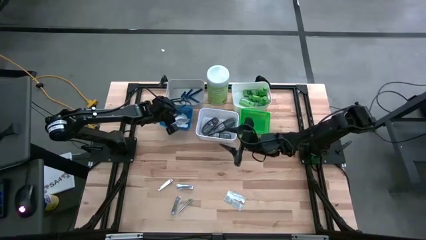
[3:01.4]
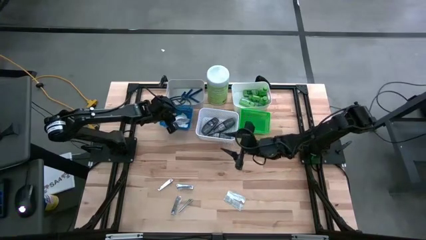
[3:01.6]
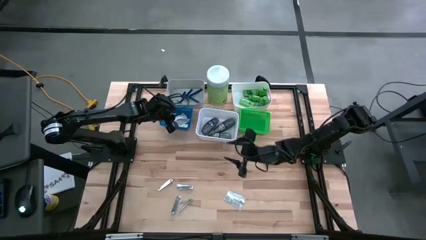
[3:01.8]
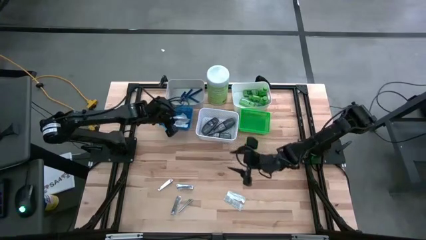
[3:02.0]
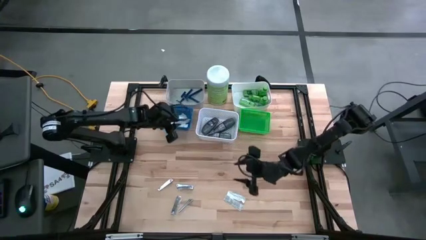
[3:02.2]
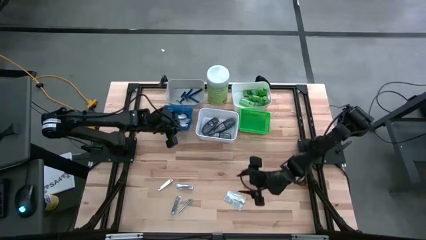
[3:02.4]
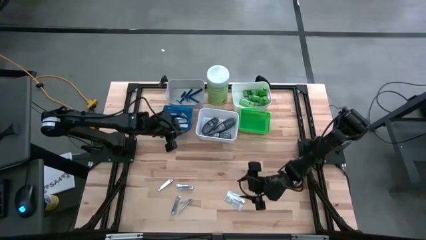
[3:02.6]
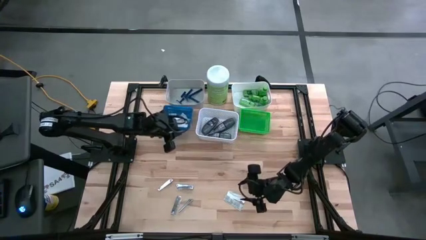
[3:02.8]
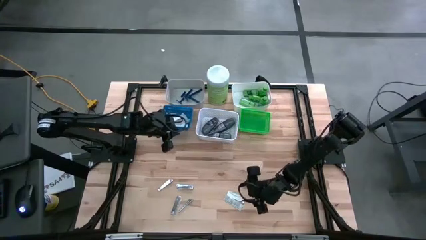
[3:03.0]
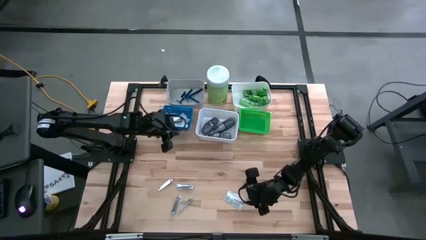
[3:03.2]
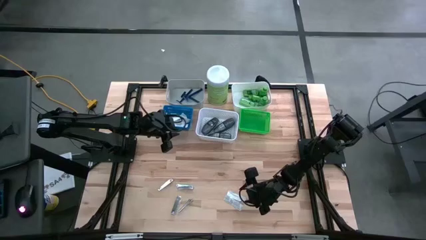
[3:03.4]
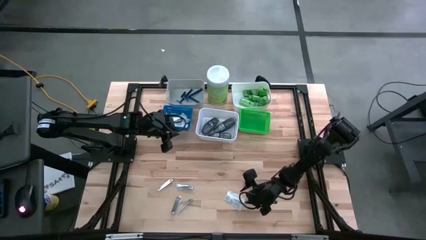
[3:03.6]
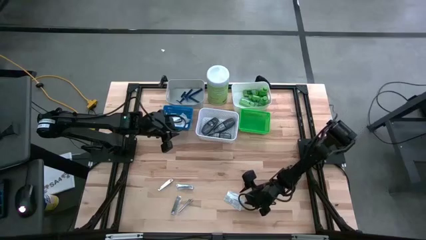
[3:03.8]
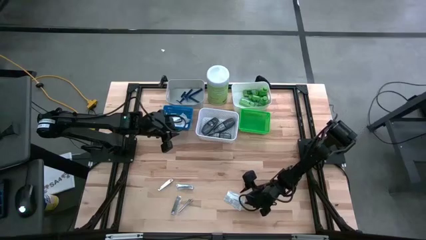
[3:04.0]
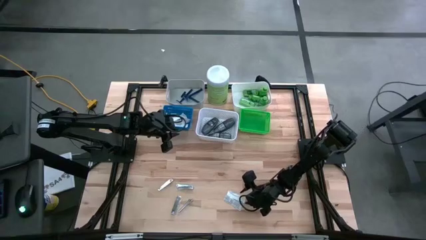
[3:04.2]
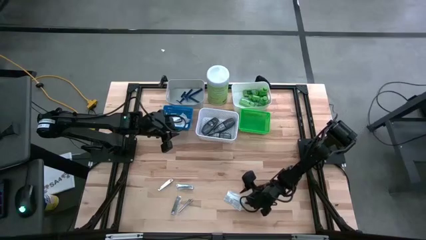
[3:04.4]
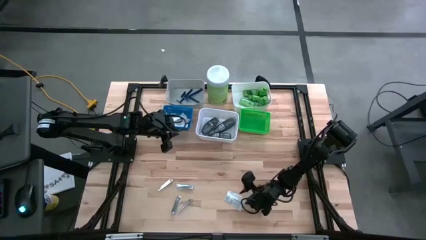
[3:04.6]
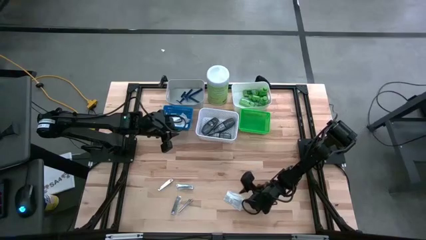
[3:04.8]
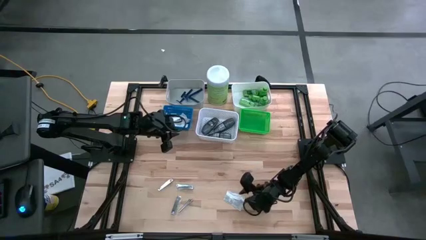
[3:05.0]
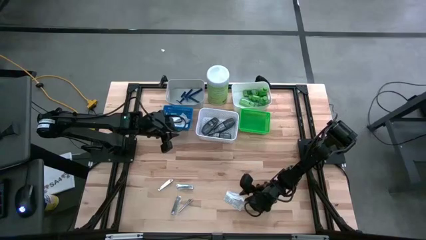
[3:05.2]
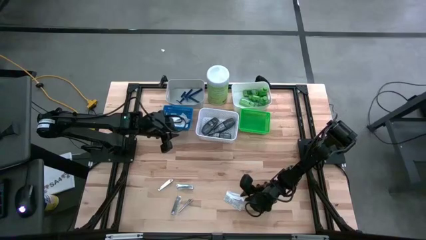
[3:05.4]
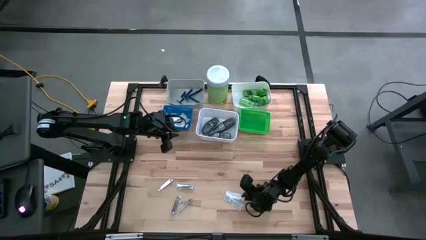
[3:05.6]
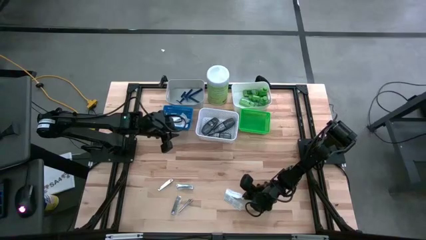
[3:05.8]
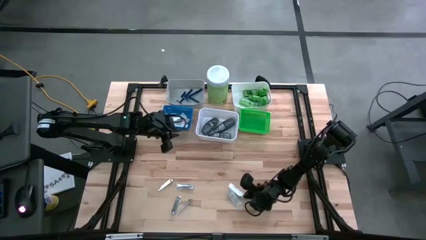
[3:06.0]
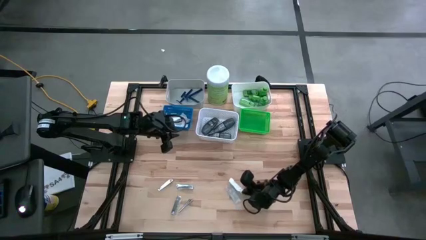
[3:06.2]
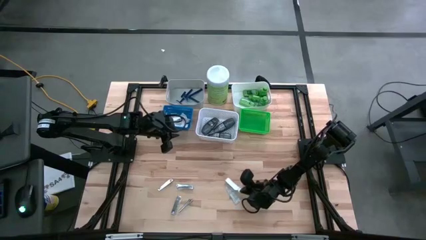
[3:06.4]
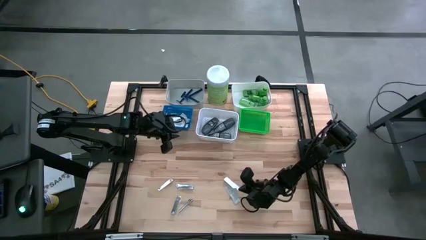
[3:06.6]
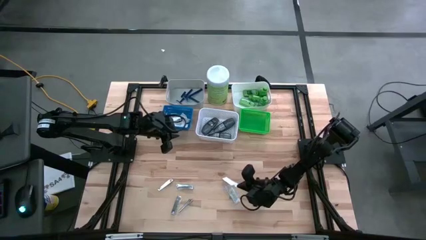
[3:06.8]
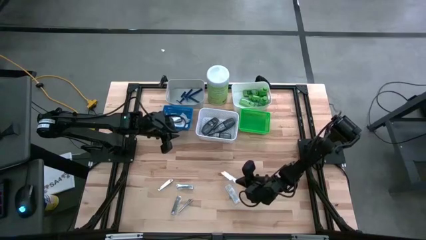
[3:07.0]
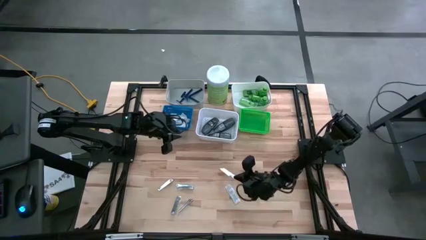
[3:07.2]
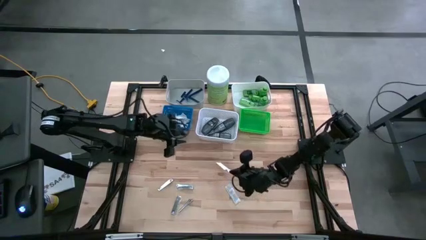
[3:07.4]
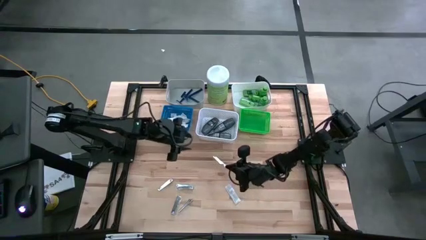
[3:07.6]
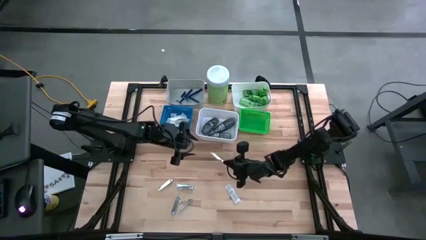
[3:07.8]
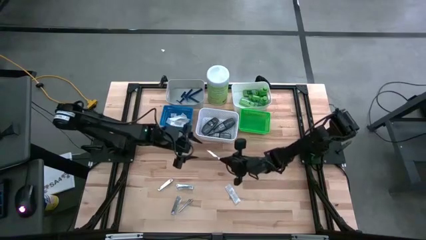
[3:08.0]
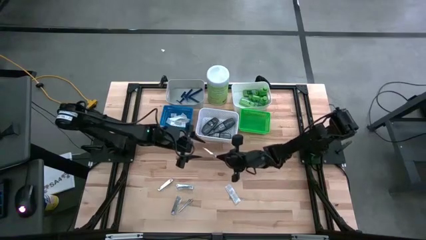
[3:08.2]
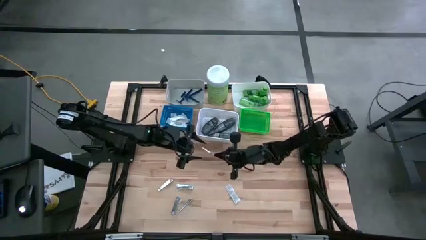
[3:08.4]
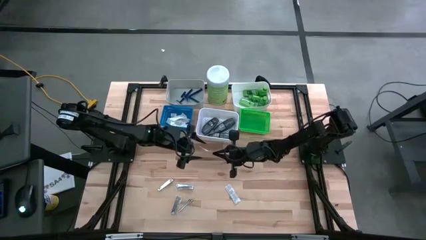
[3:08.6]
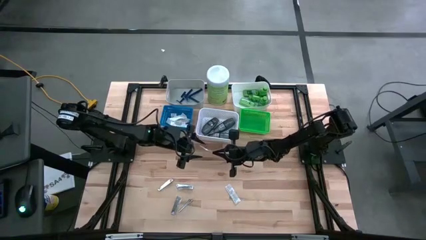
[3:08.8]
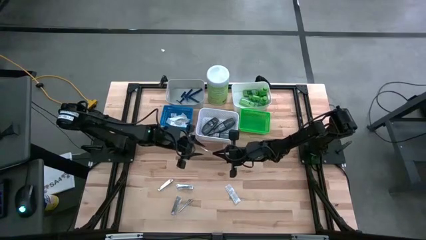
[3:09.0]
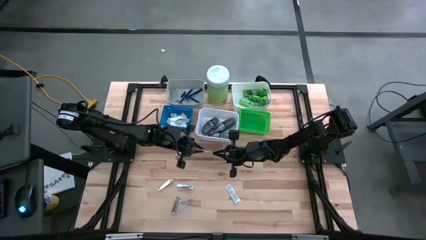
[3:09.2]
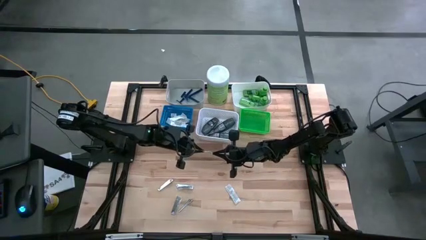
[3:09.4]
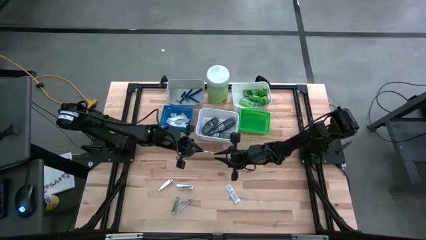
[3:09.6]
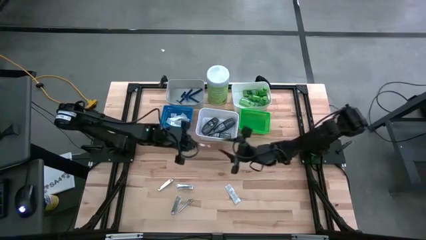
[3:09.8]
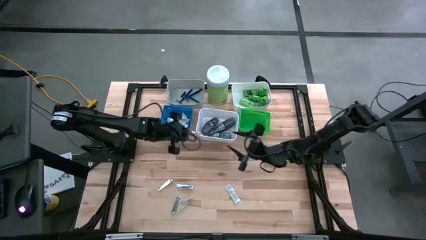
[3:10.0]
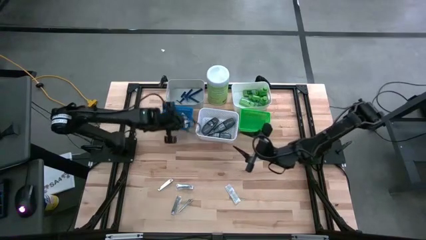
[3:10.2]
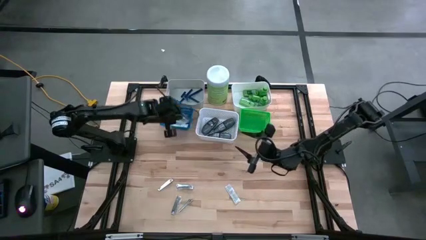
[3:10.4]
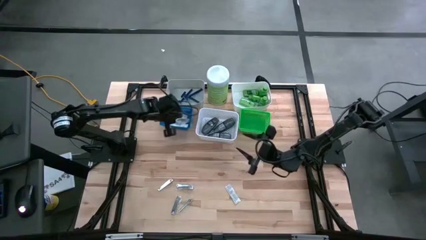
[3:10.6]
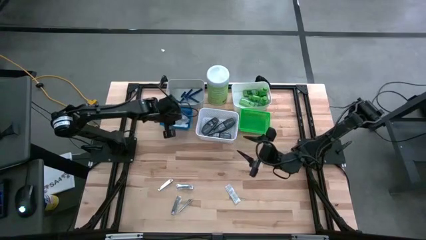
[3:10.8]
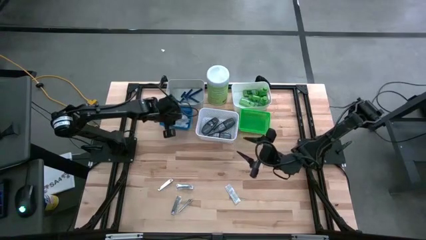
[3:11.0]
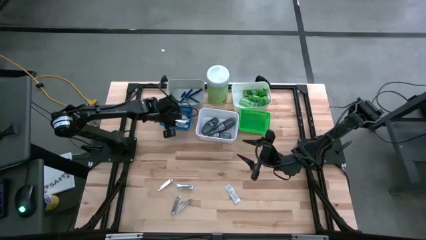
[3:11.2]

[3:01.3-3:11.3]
Task: Pick & Place Travel size toiletries
Put the white bandage into the blue bin
